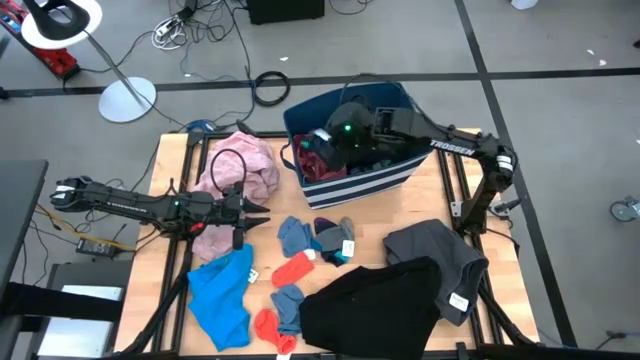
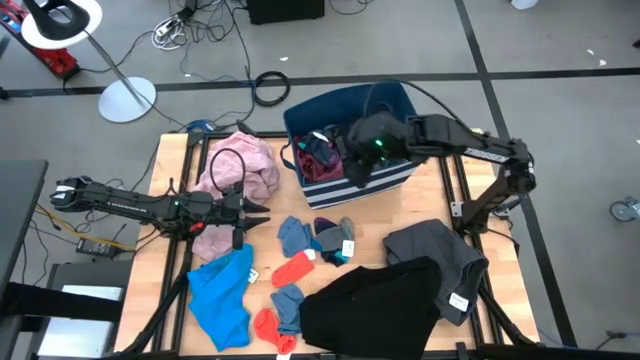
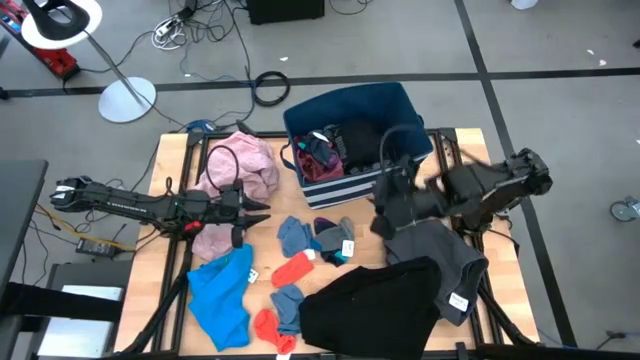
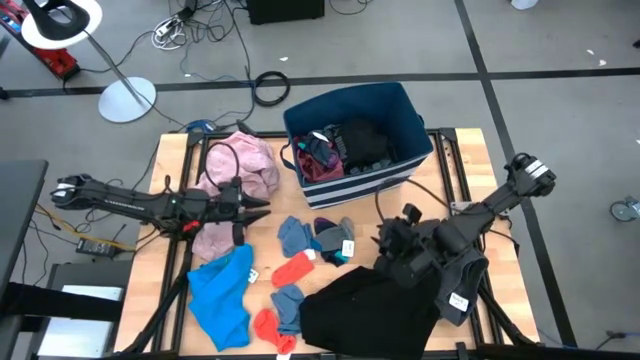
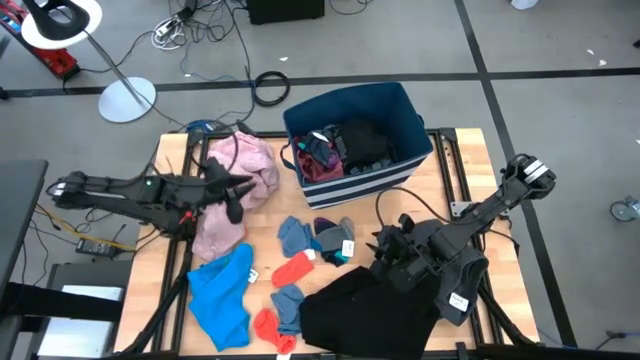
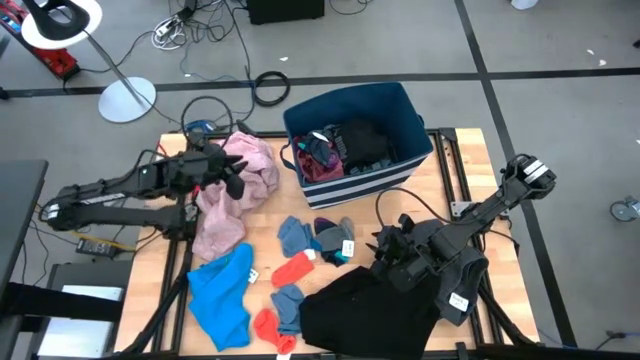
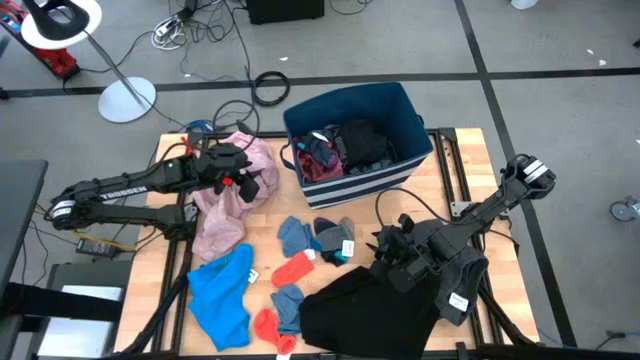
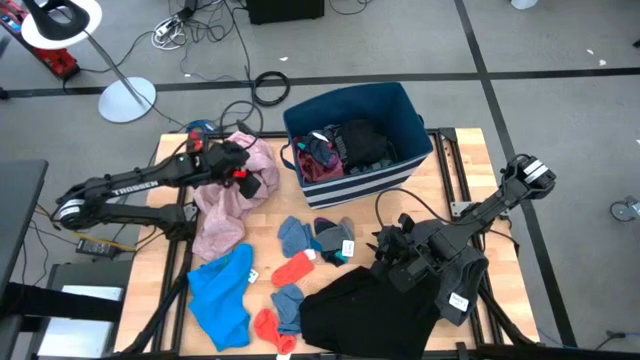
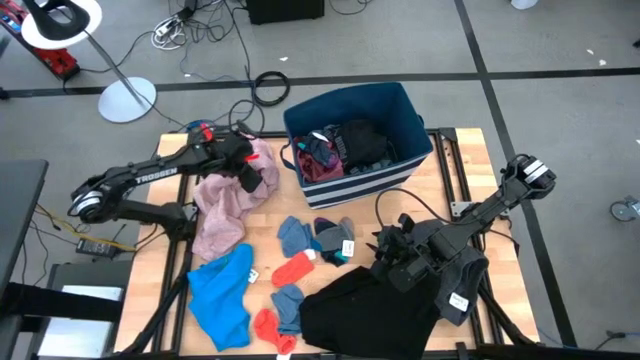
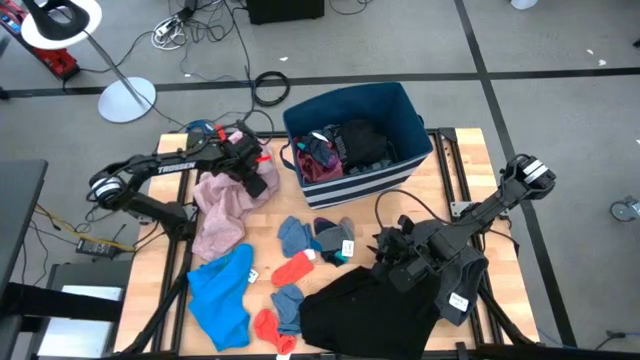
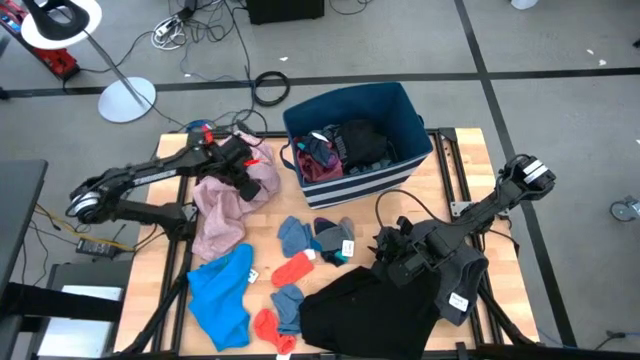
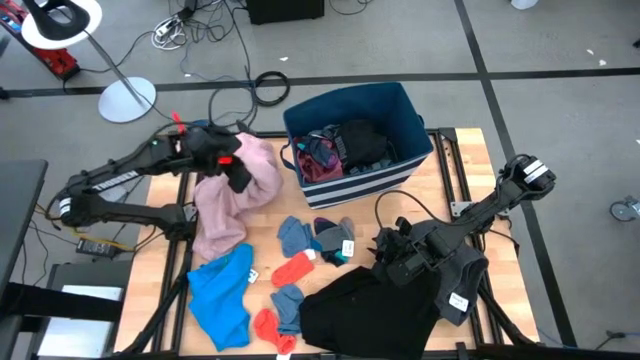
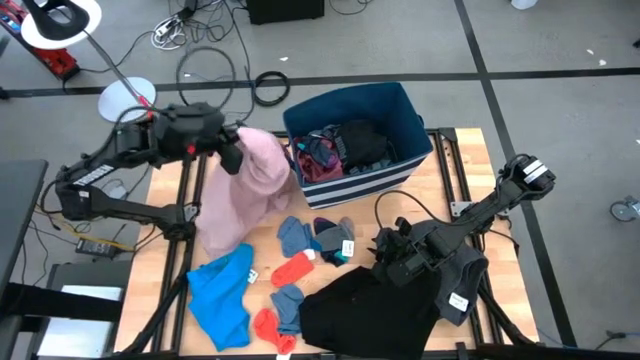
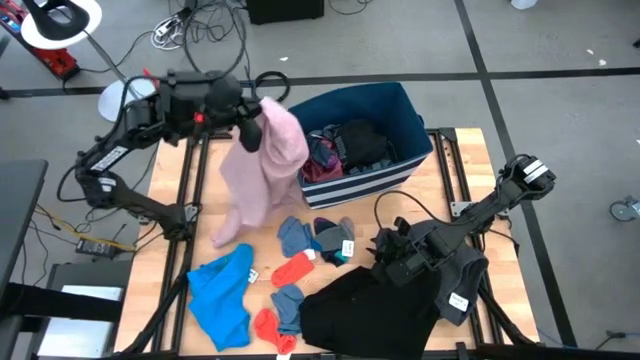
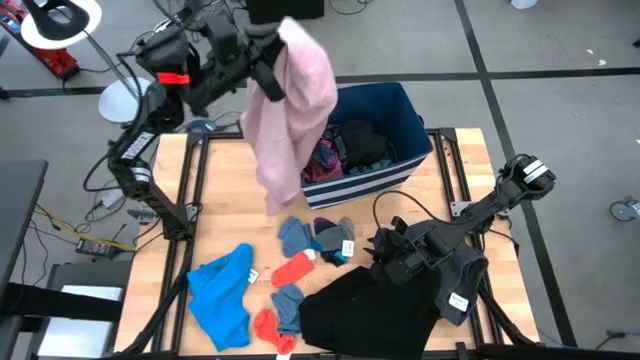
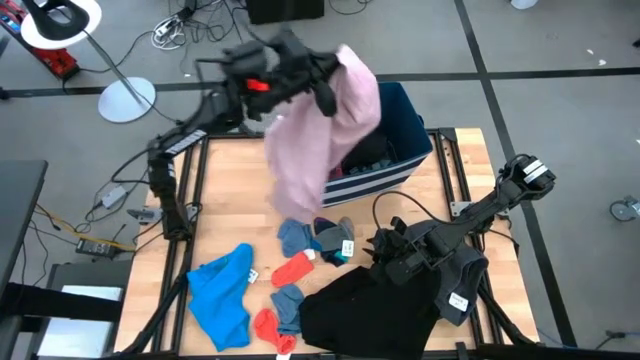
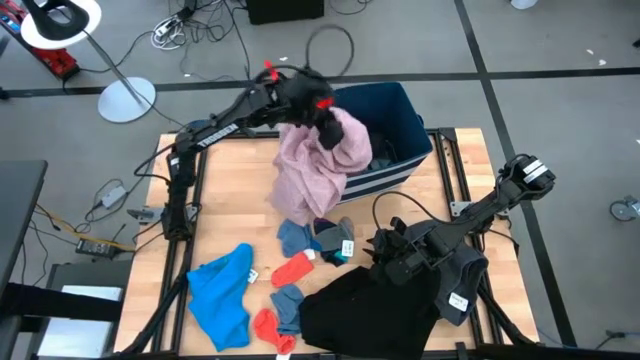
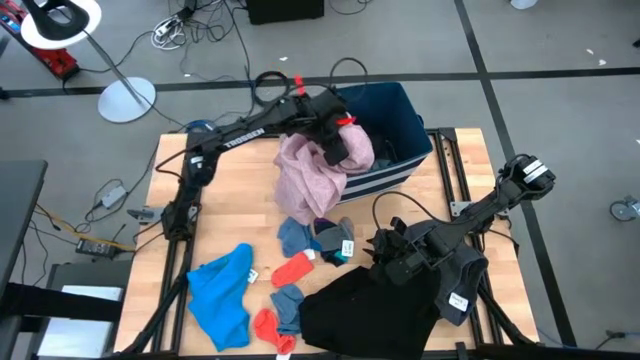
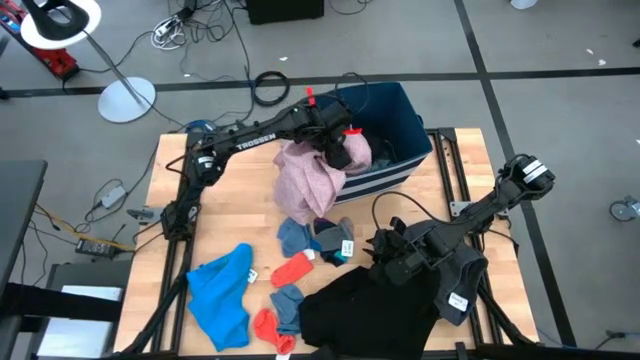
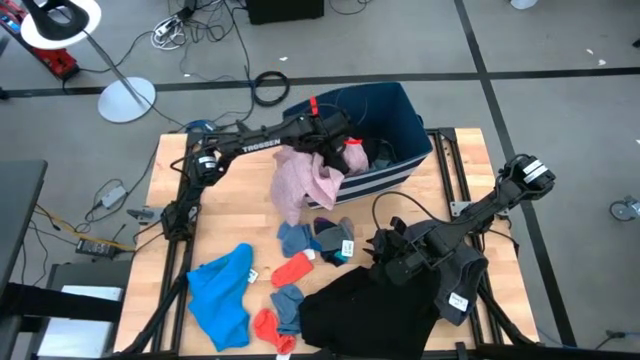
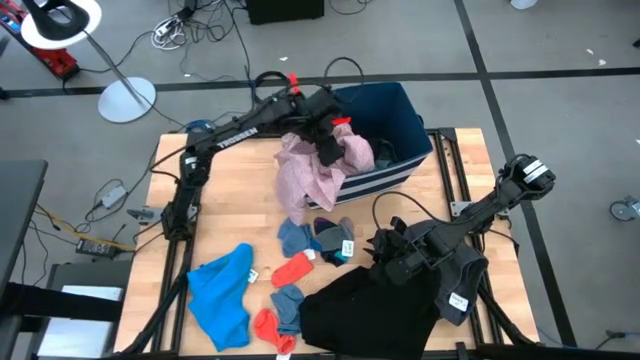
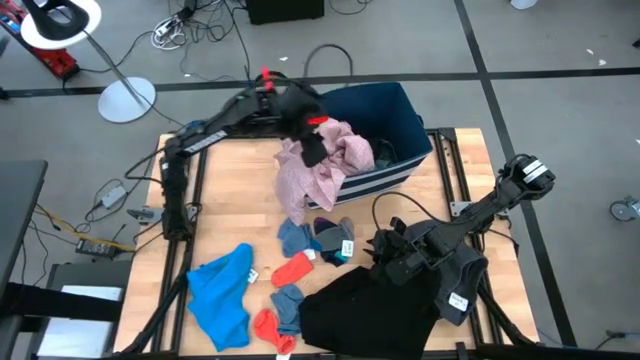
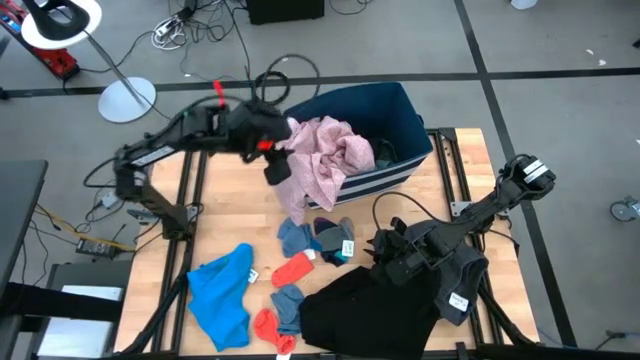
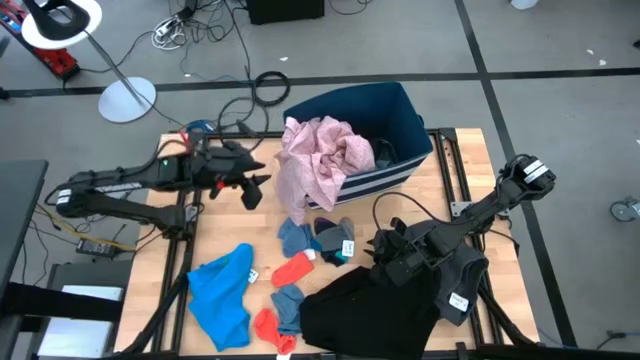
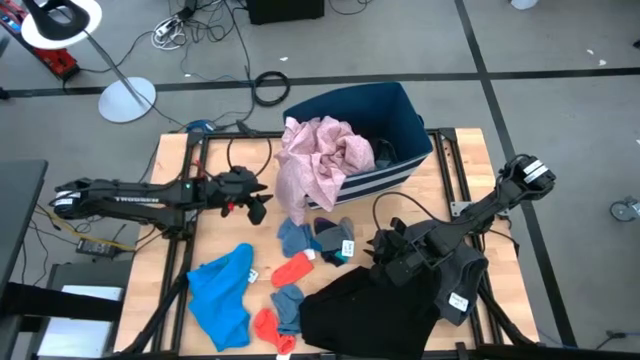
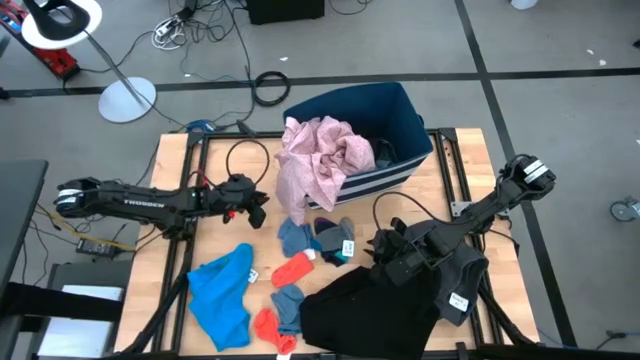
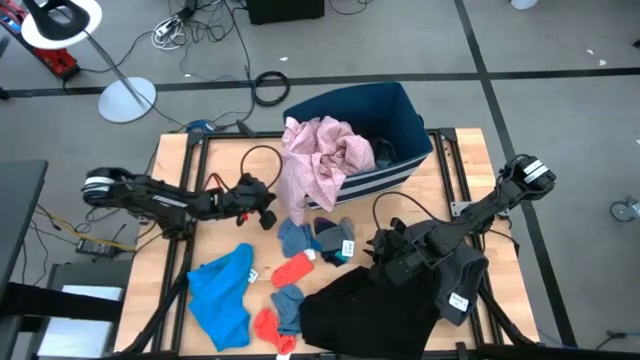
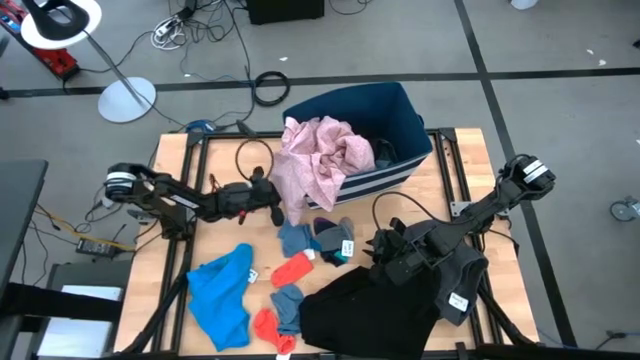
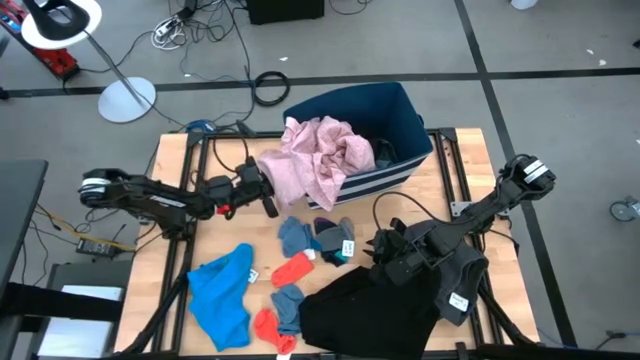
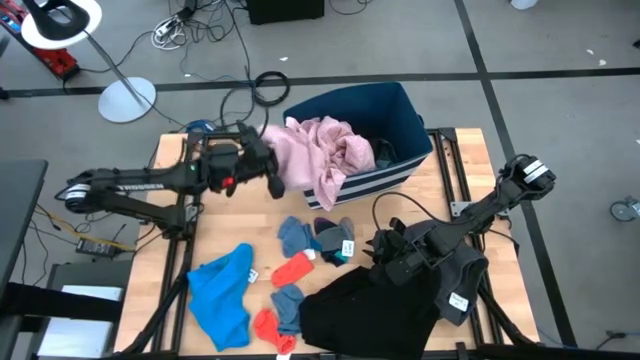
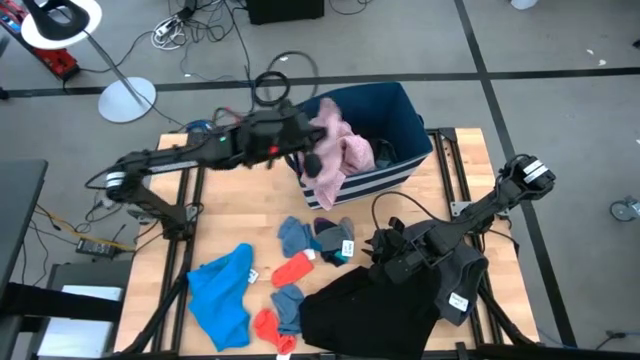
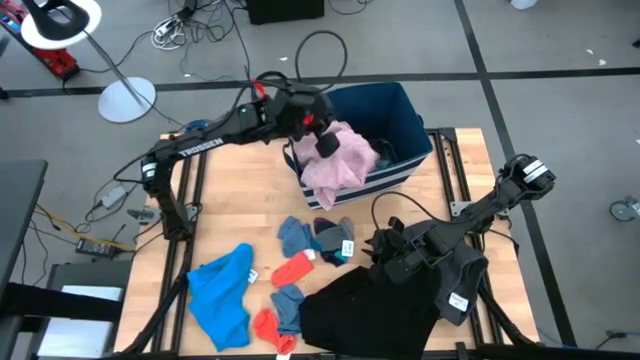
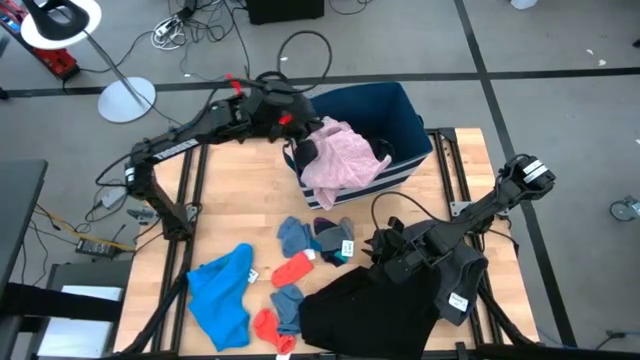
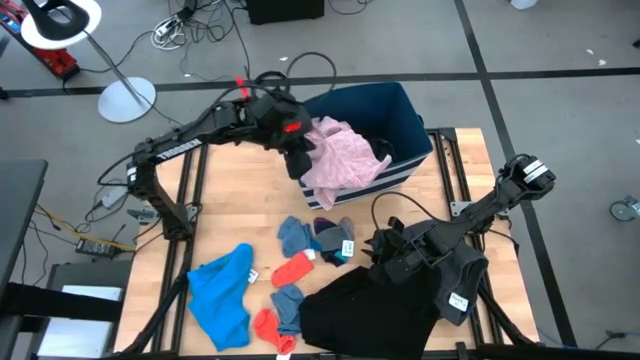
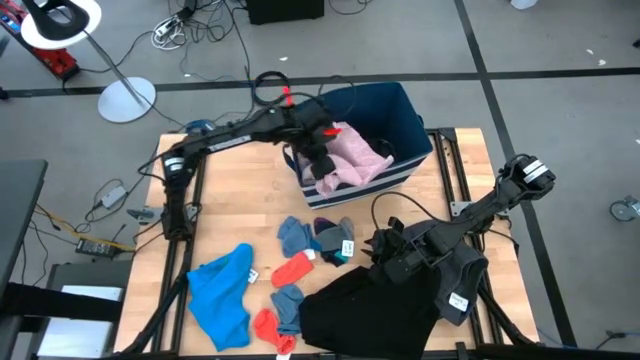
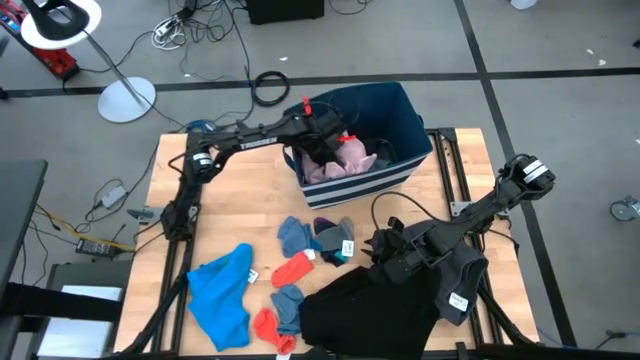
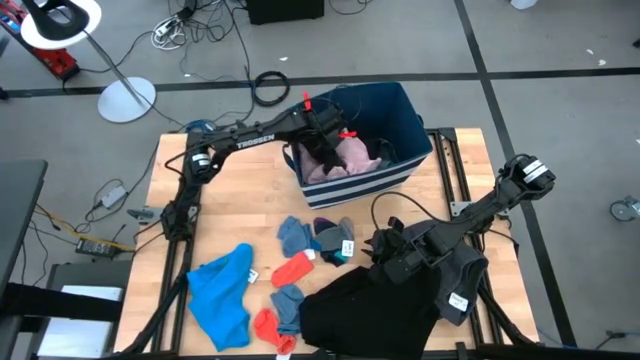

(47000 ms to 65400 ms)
Task: Sort clothes
Put the pink shirt in the blue laundry bin organizer

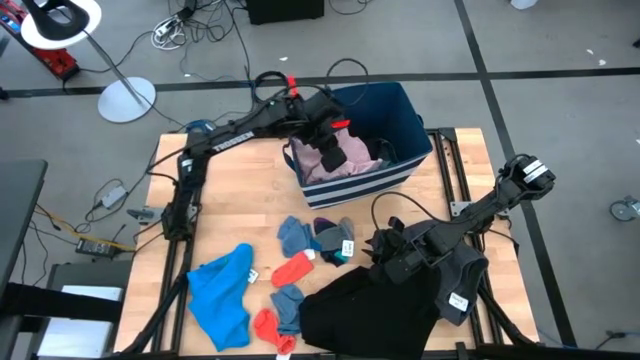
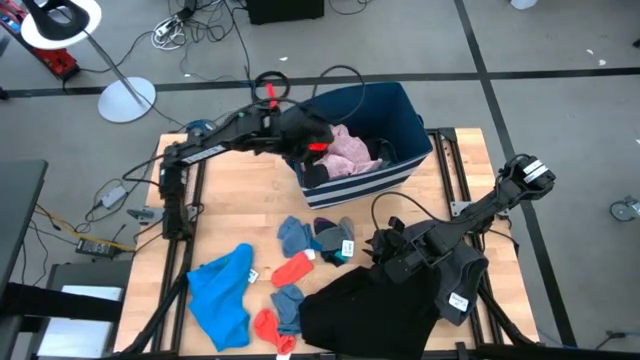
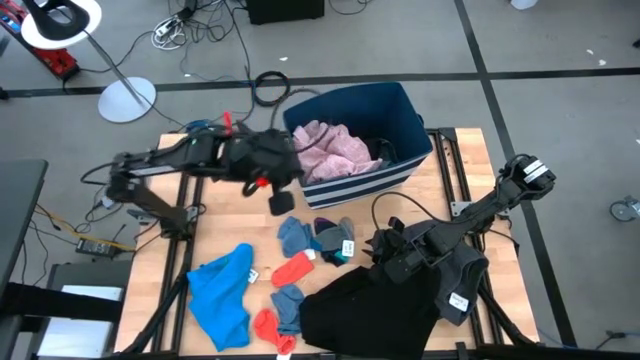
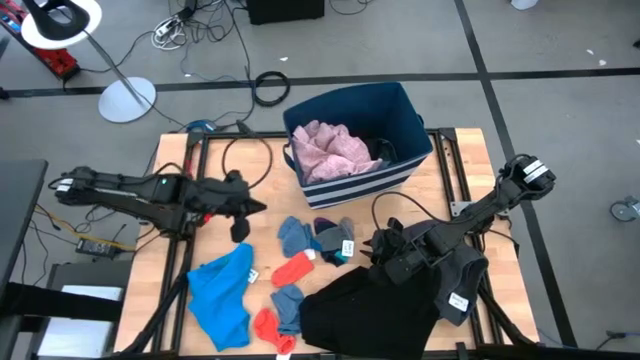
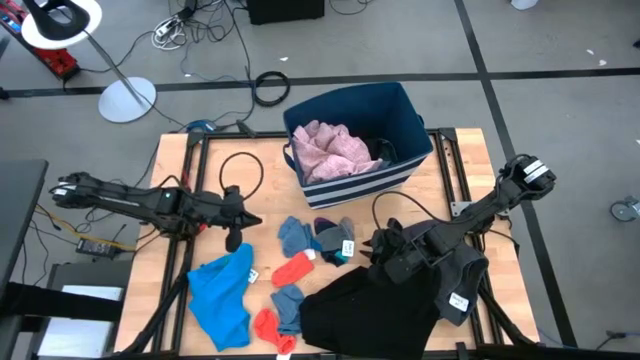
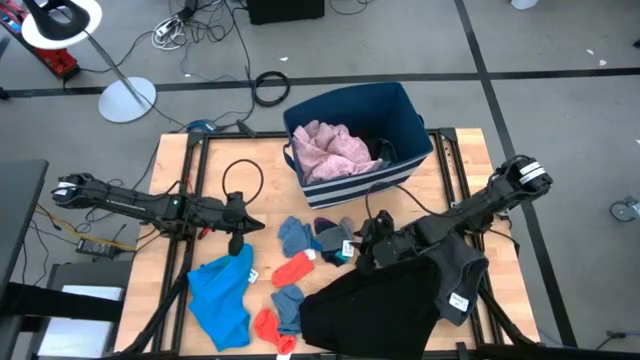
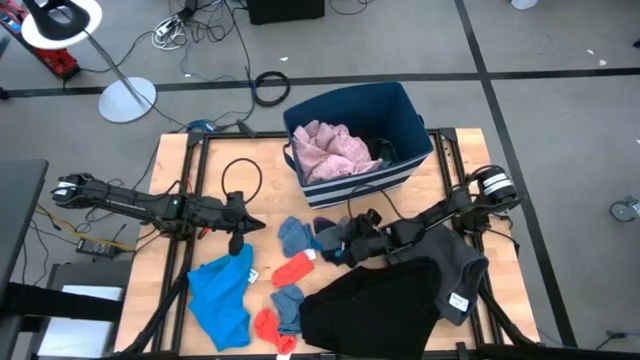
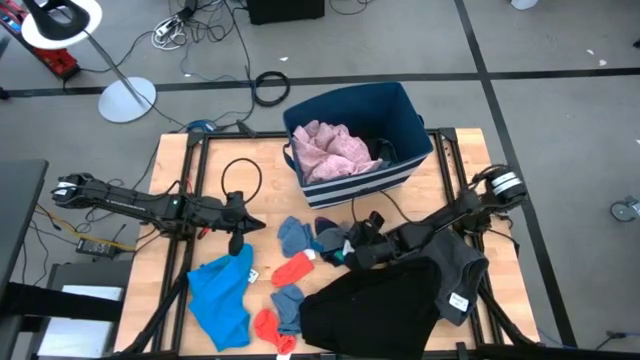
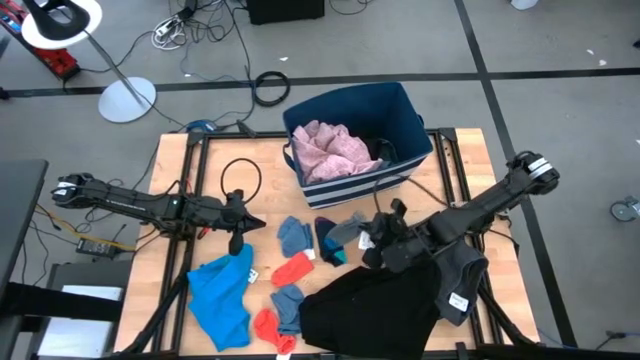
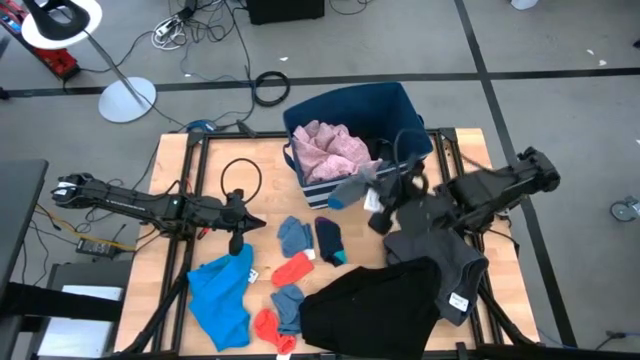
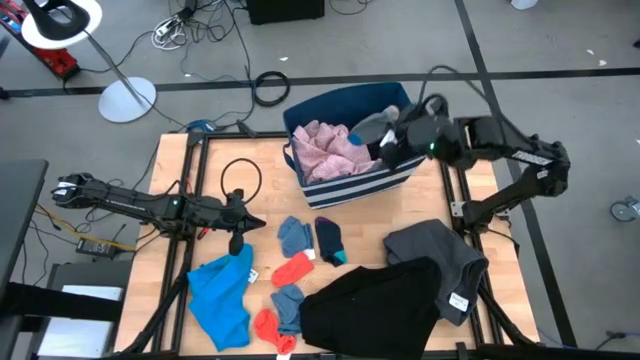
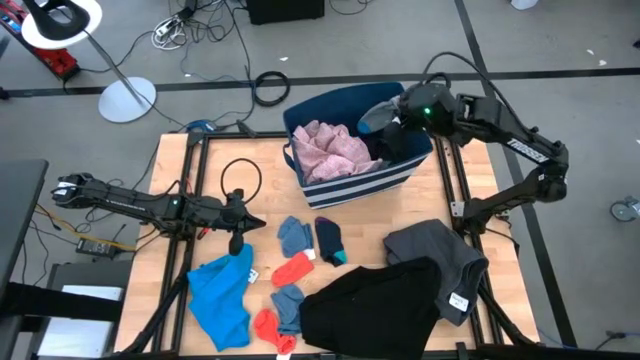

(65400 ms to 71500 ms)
Put the gray sock in the blue laundry bin organizer
